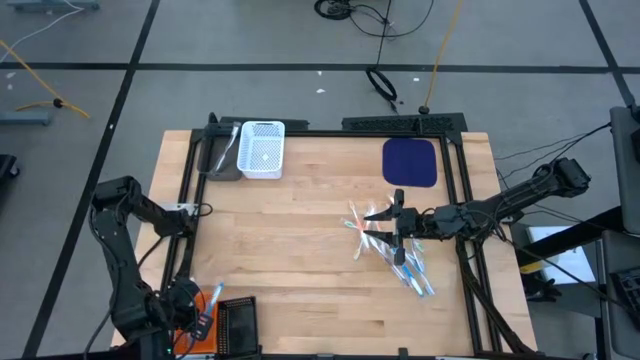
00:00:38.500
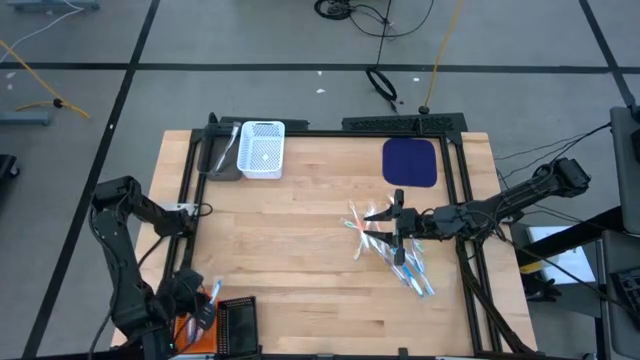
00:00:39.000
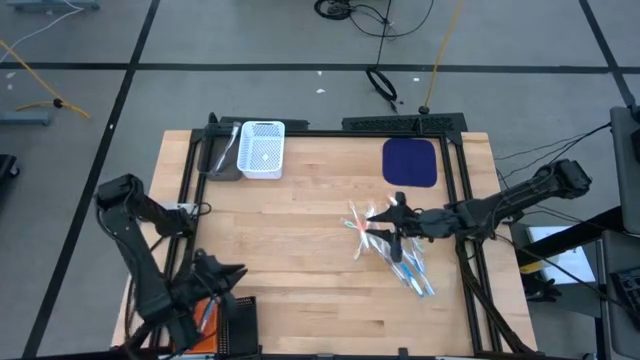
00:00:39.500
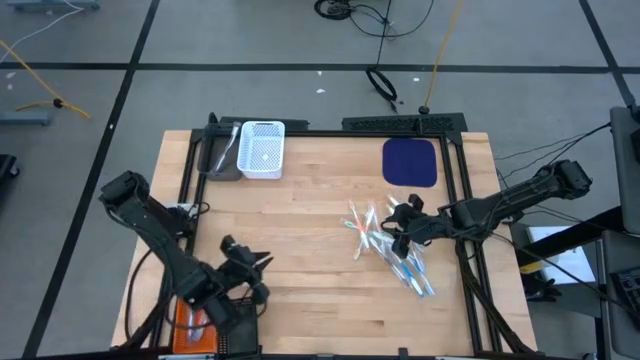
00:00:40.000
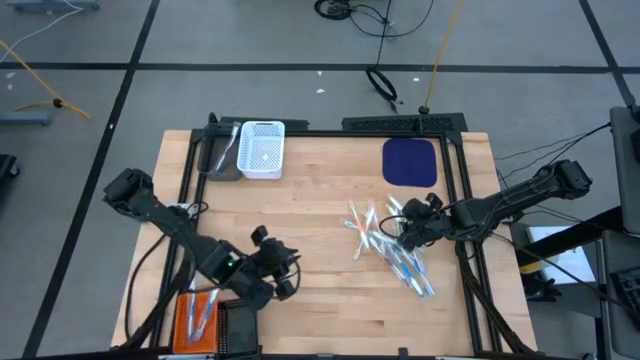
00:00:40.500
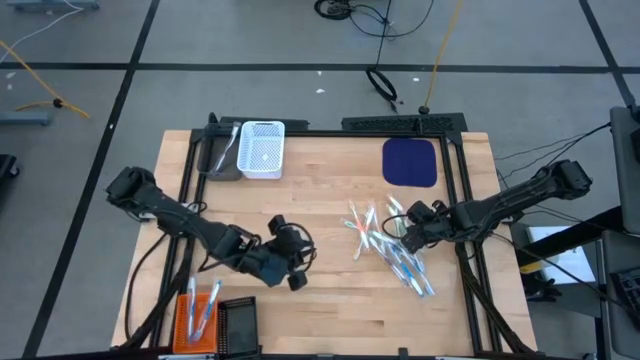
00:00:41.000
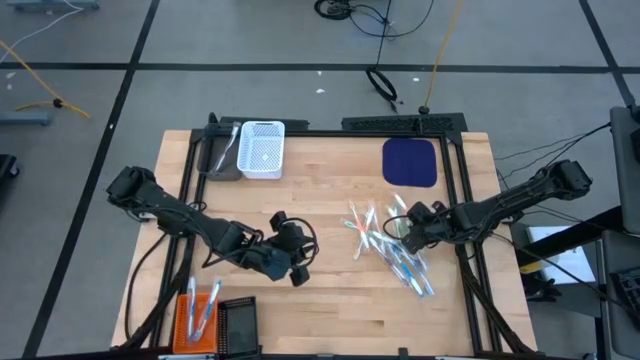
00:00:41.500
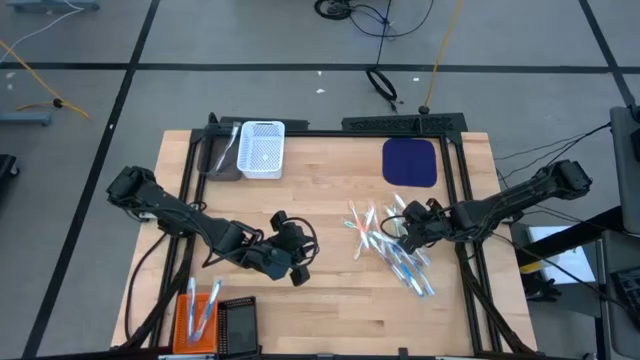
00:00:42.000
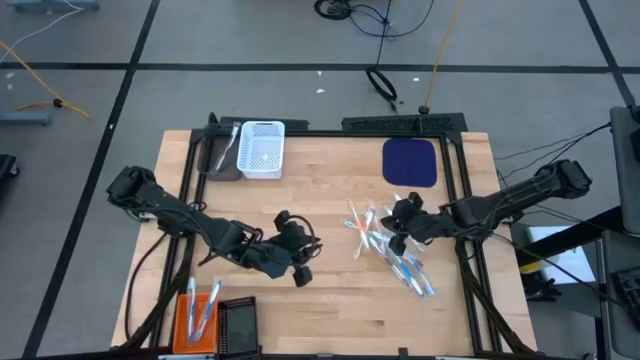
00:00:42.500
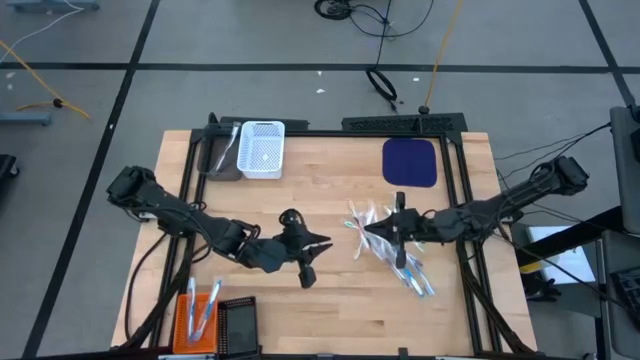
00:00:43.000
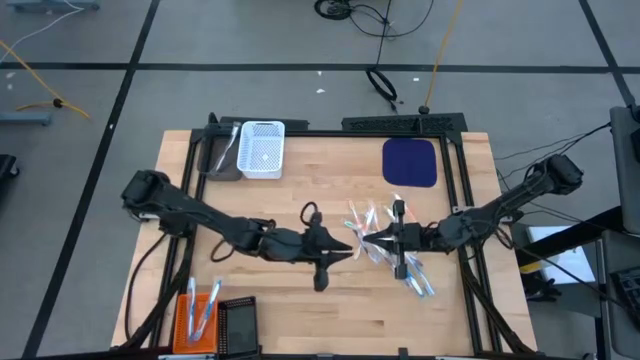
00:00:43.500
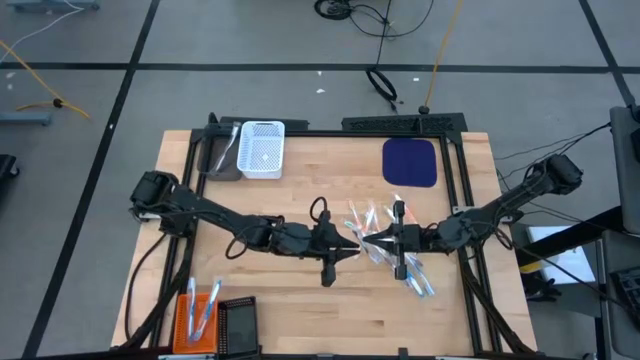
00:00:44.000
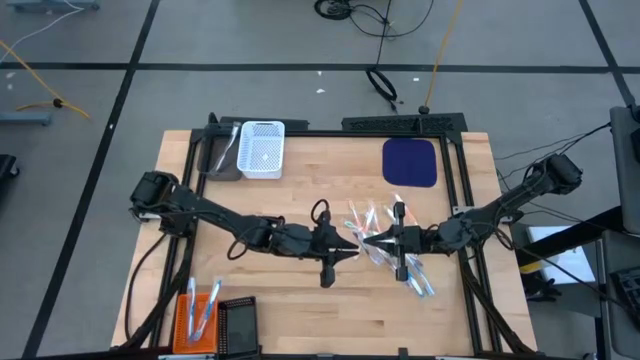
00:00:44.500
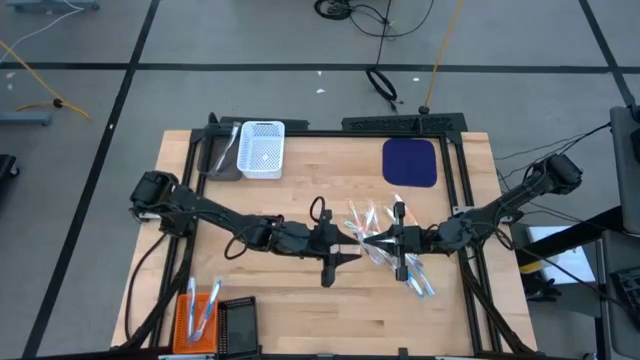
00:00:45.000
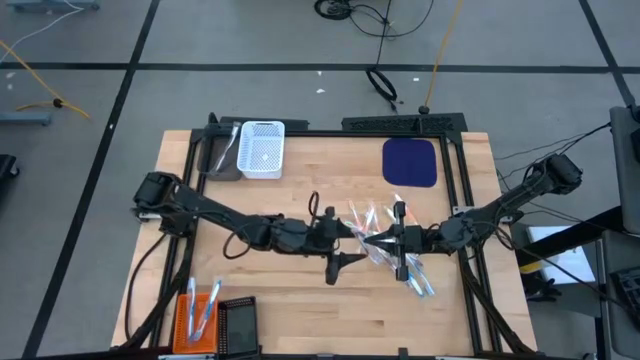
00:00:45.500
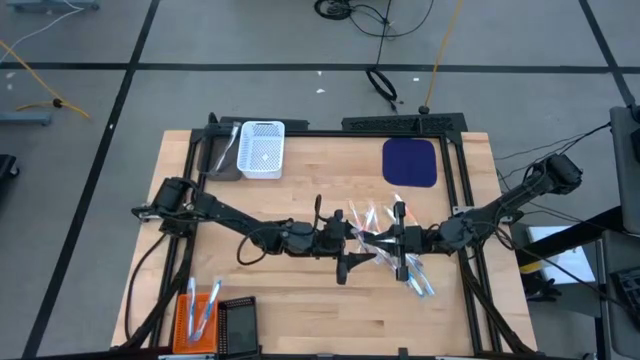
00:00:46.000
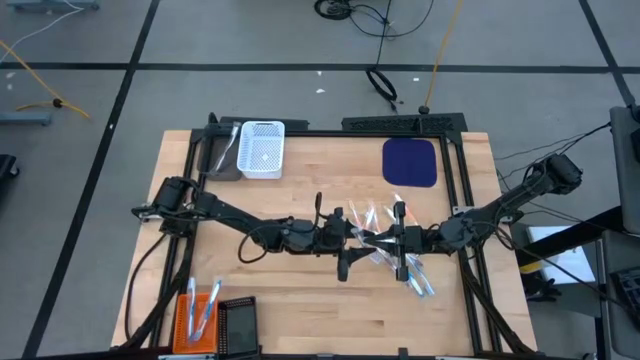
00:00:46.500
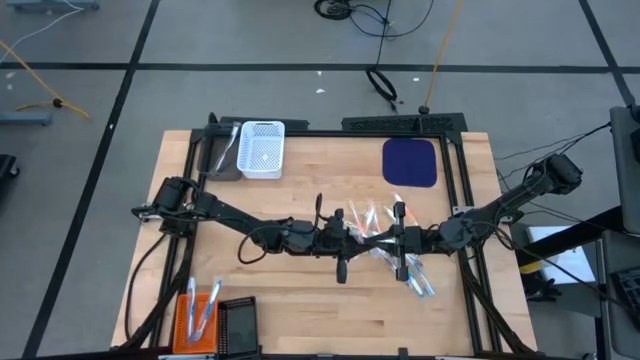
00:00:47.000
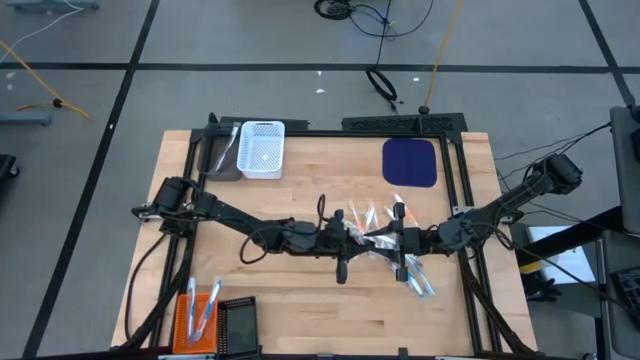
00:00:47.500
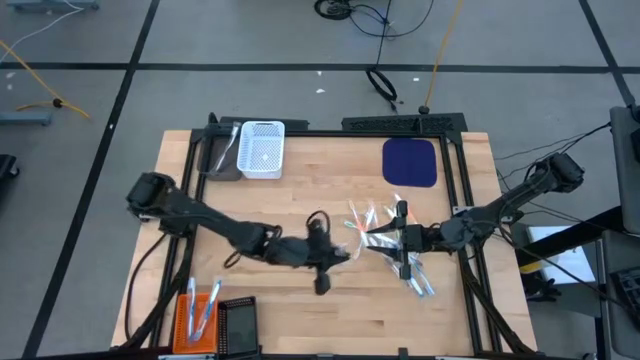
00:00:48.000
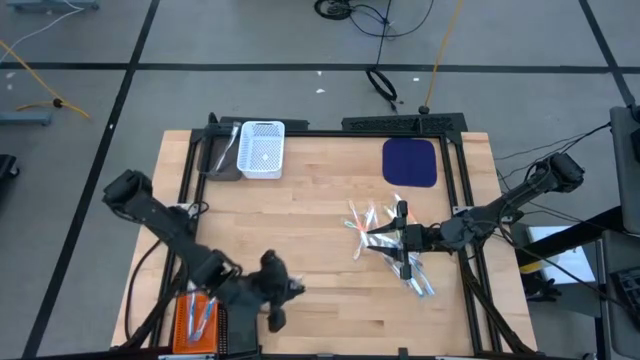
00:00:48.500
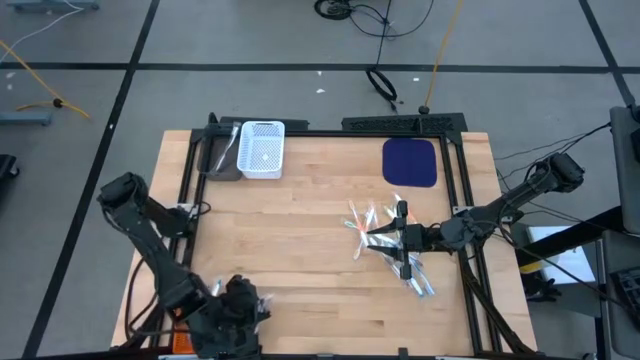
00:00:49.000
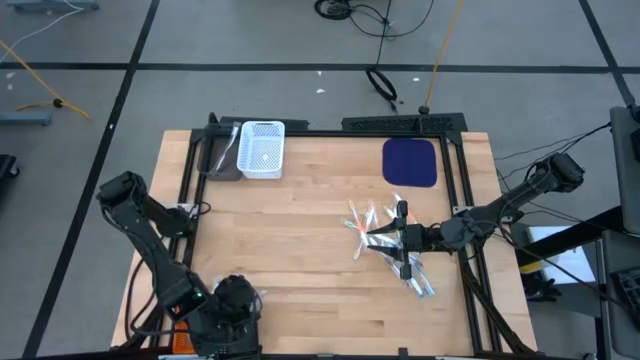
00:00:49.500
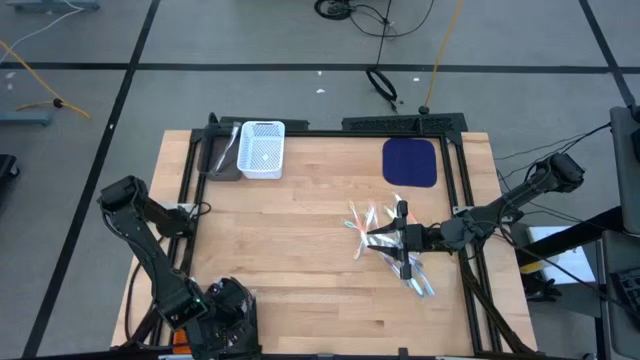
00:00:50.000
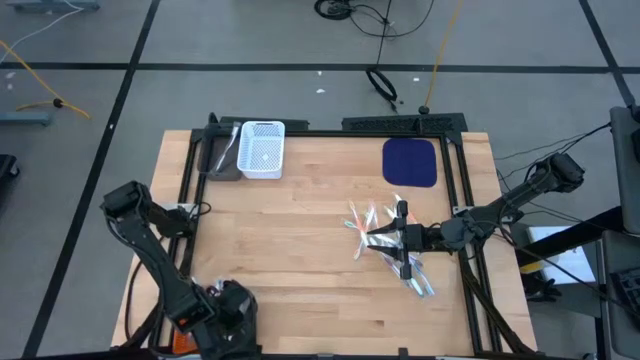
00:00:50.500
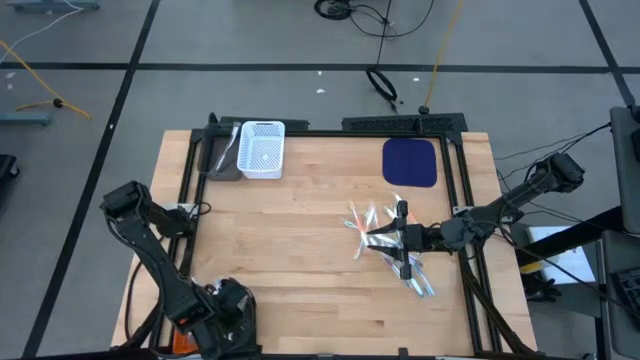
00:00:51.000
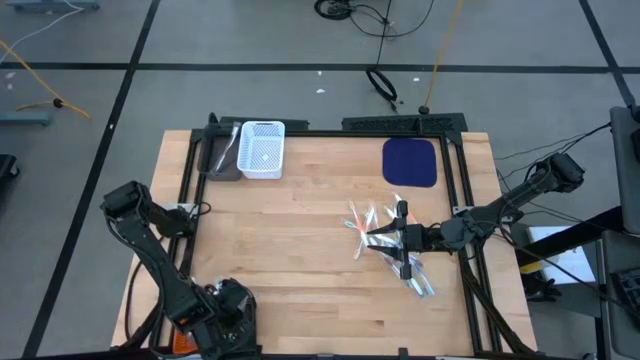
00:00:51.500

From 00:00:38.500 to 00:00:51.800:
Task: Pick & Place Toothbrushes
Put the violet toothbrush into the gray bin

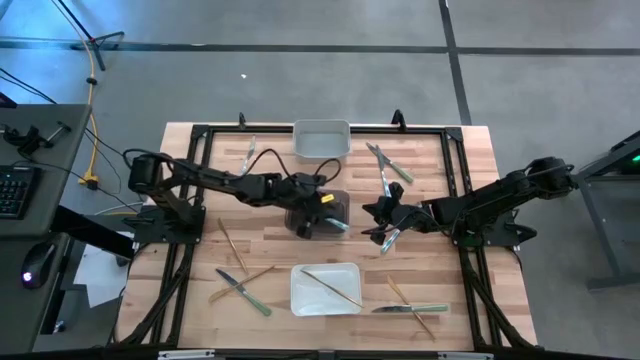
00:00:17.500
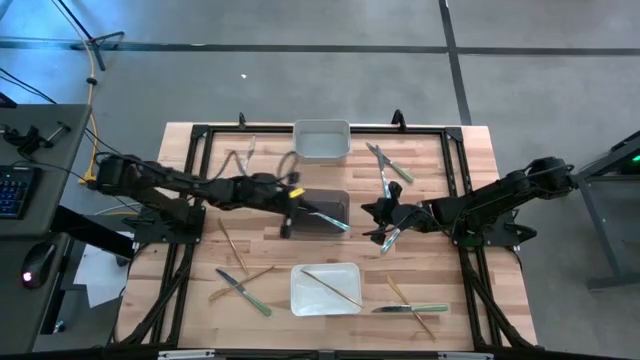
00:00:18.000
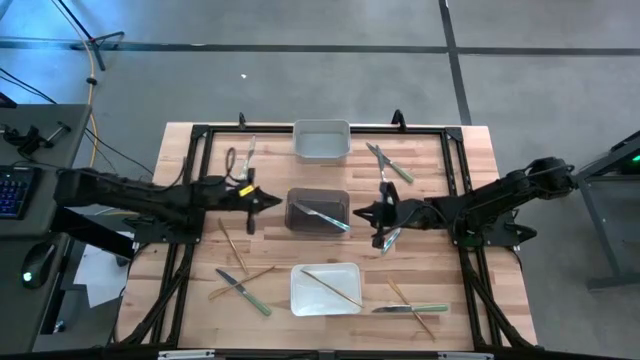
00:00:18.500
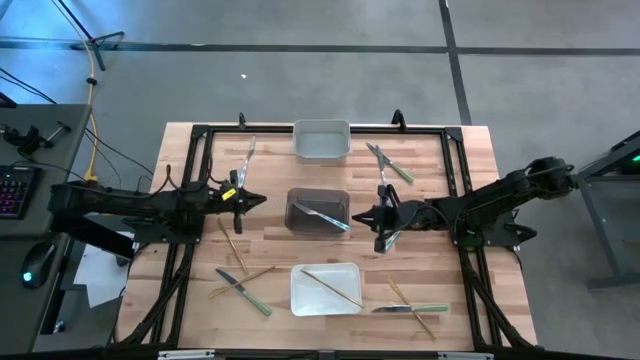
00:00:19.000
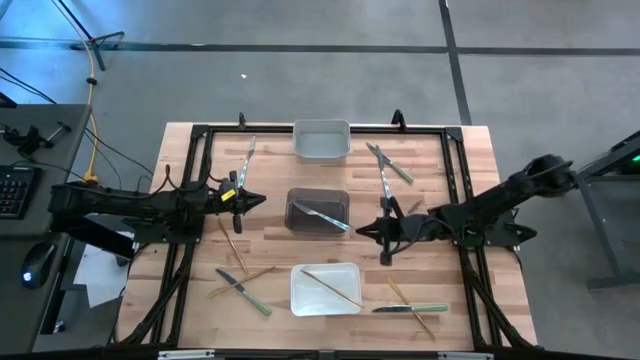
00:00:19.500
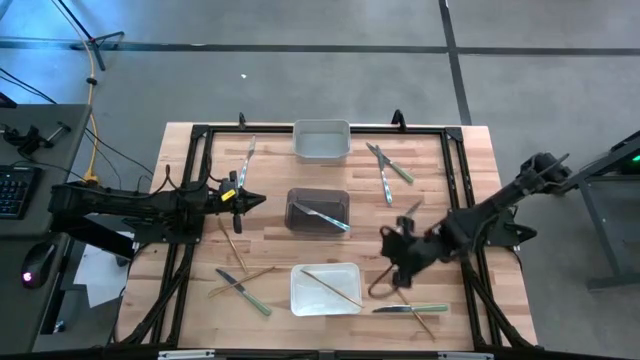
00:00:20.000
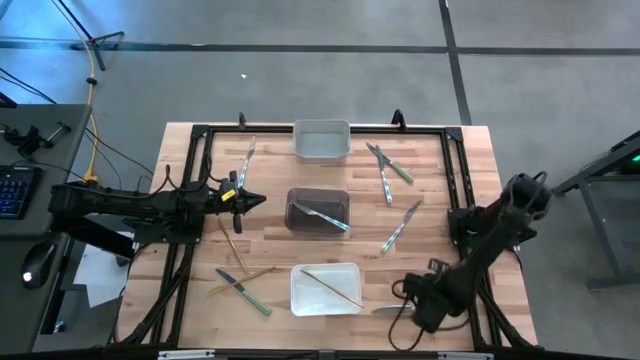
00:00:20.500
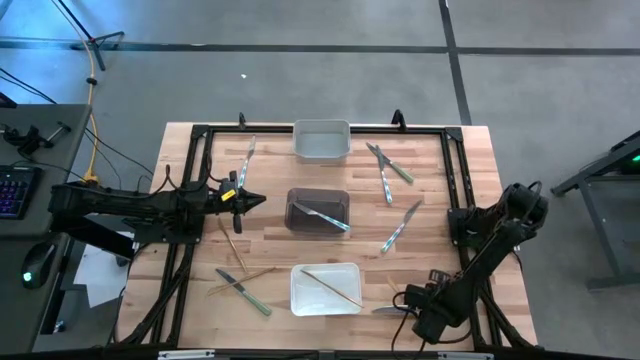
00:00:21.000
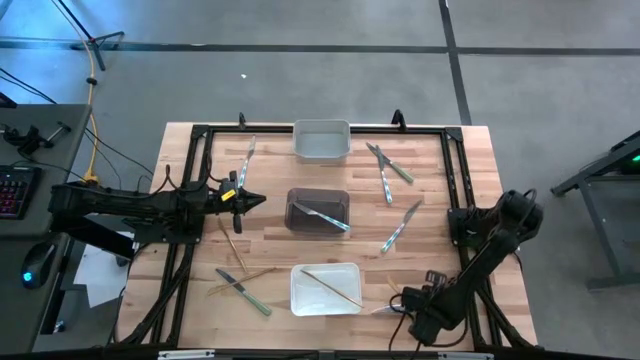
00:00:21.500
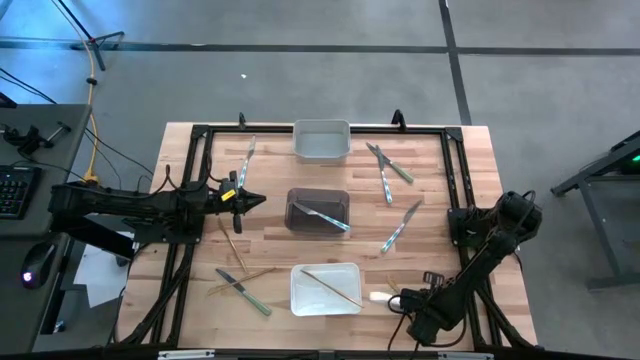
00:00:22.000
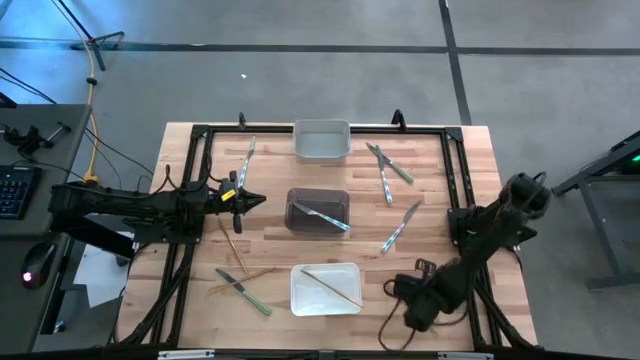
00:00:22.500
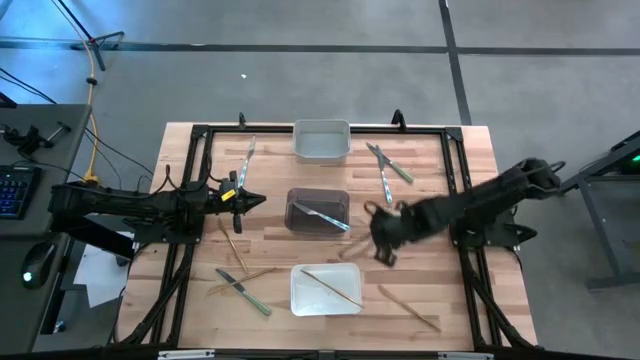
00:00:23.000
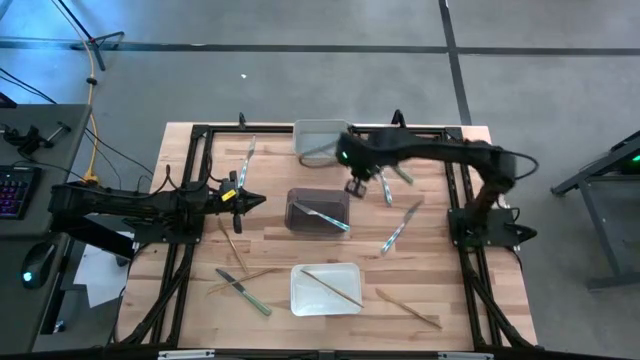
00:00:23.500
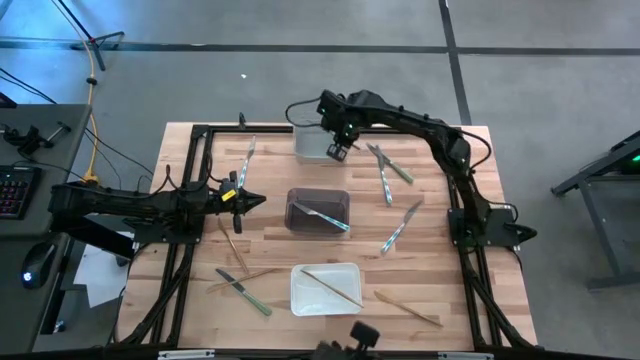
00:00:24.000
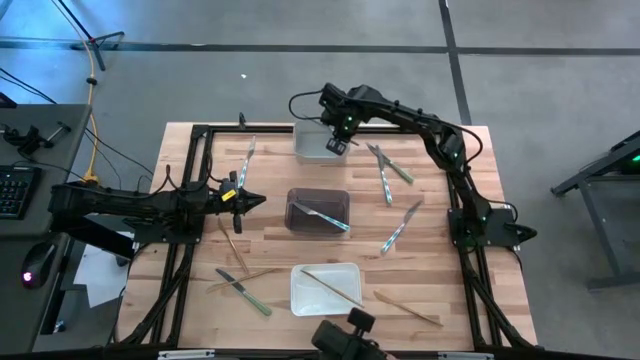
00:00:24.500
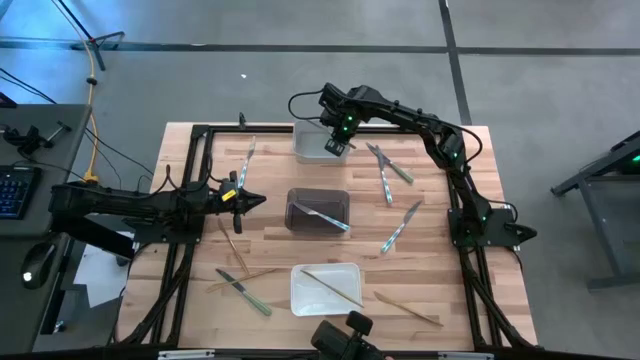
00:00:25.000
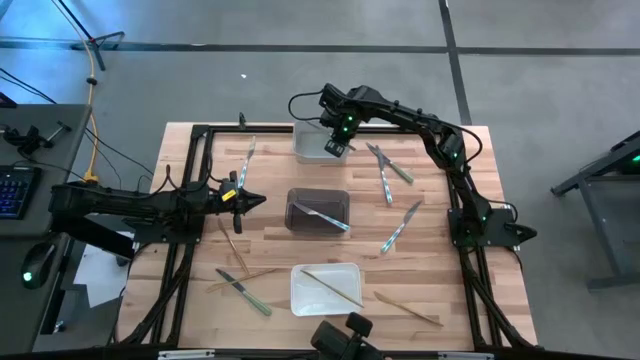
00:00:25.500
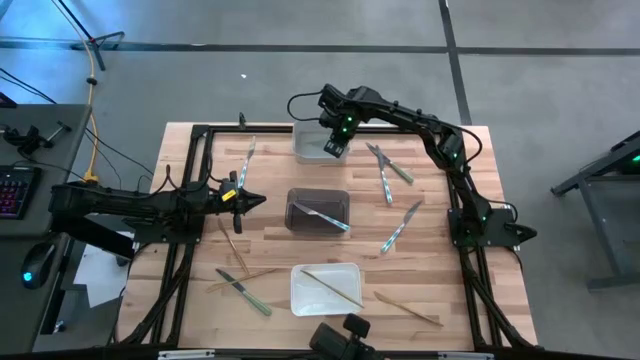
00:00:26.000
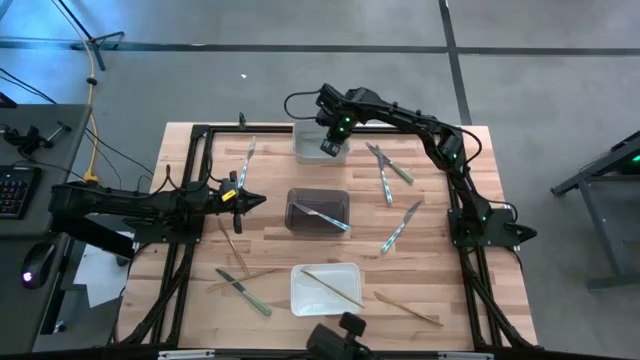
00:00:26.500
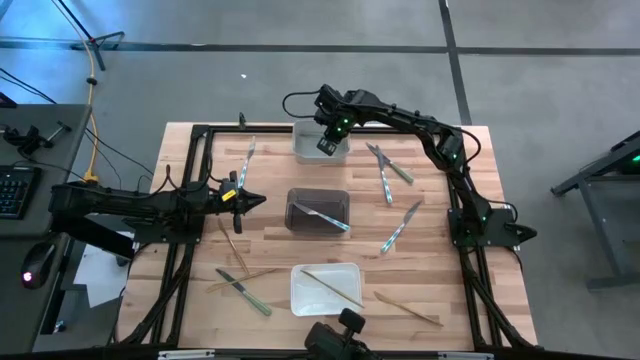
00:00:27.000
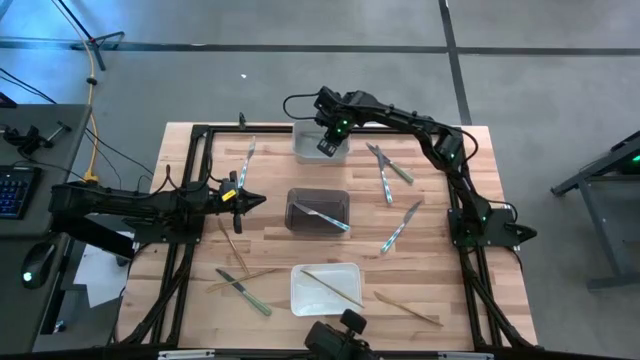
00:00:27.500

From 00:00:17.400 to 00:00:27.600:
Task: Sort silverware by color (type)
Put the green table knife into the gray bin
